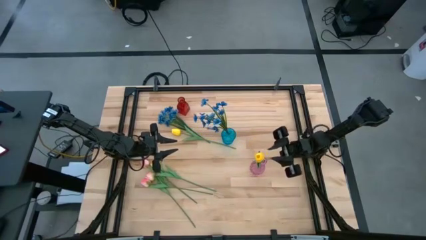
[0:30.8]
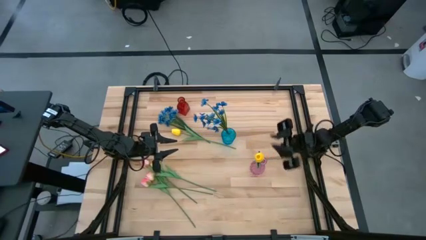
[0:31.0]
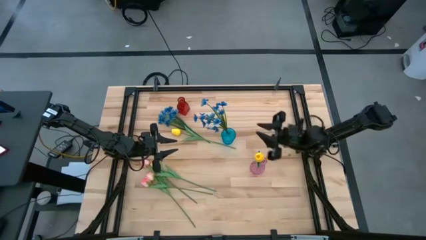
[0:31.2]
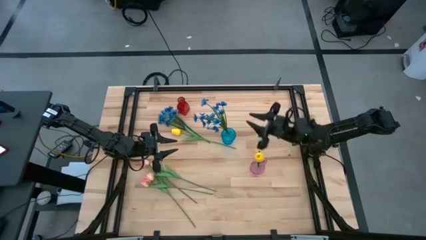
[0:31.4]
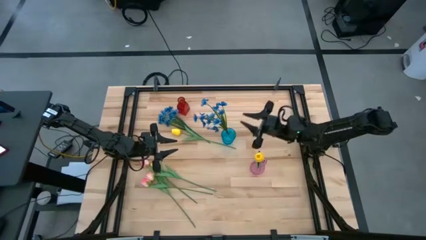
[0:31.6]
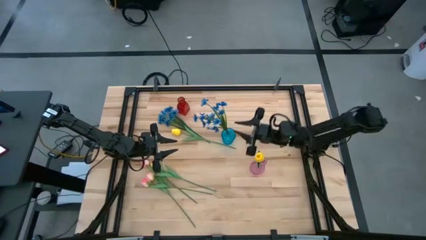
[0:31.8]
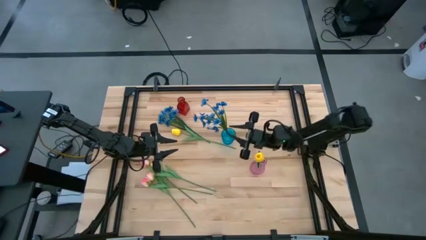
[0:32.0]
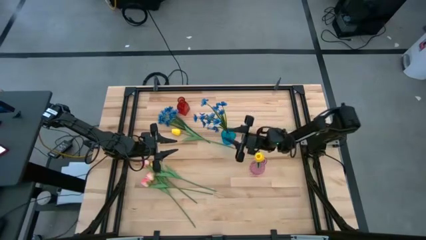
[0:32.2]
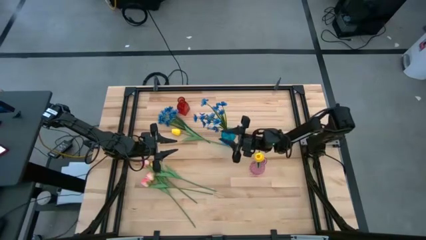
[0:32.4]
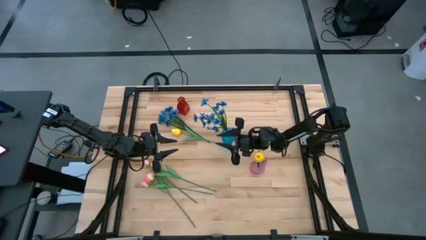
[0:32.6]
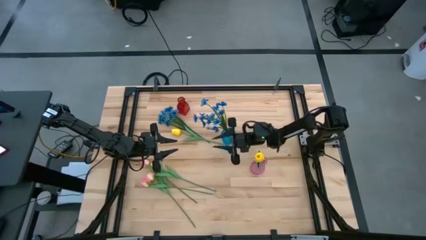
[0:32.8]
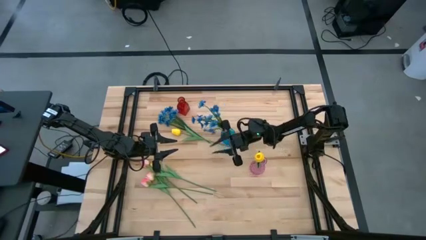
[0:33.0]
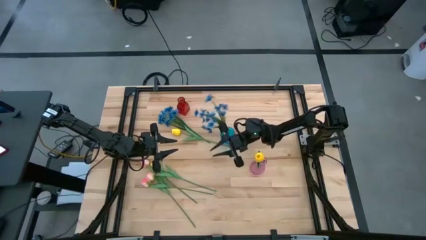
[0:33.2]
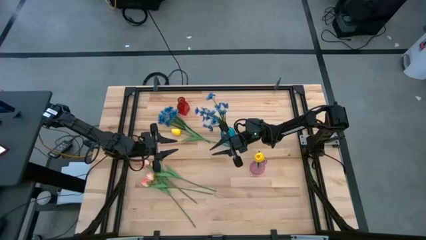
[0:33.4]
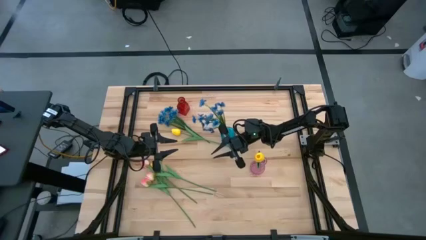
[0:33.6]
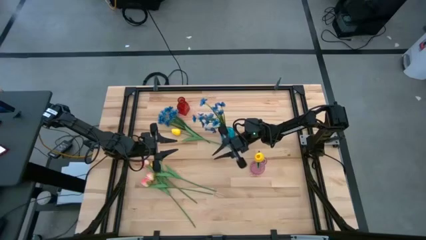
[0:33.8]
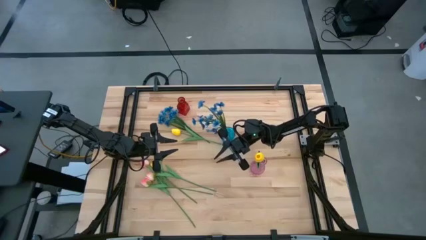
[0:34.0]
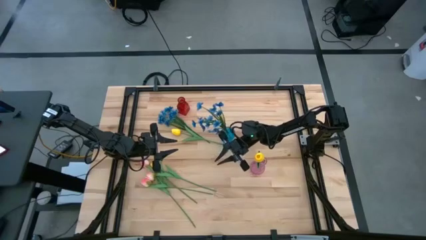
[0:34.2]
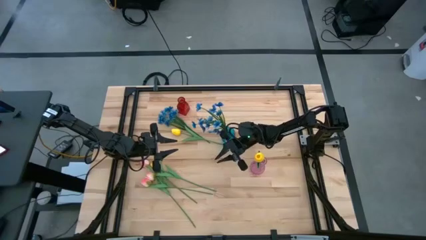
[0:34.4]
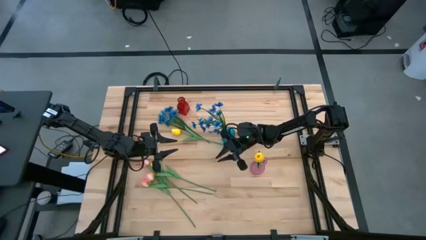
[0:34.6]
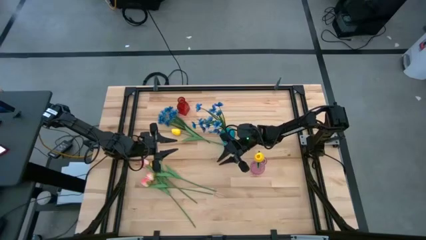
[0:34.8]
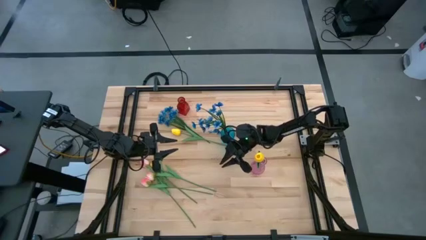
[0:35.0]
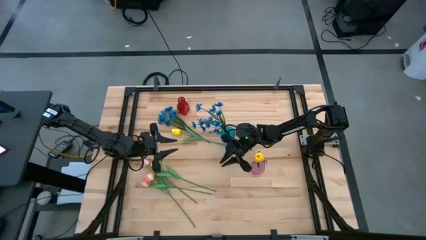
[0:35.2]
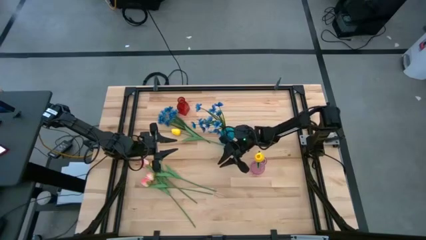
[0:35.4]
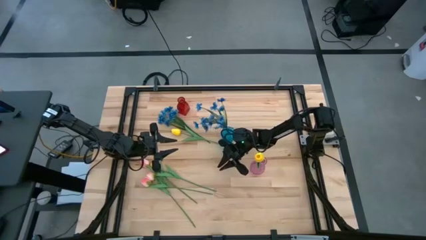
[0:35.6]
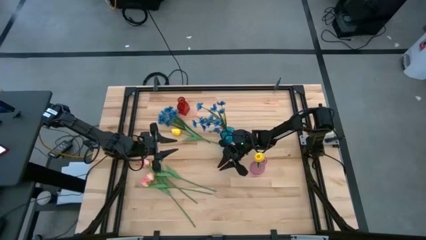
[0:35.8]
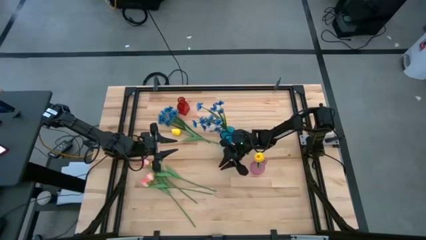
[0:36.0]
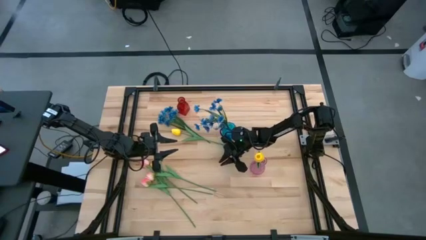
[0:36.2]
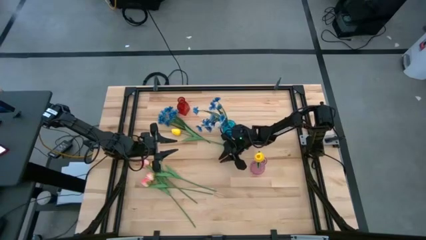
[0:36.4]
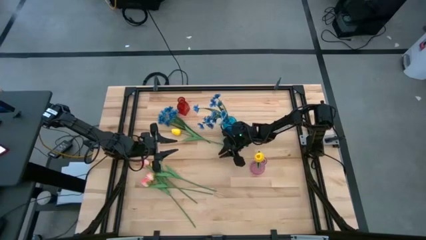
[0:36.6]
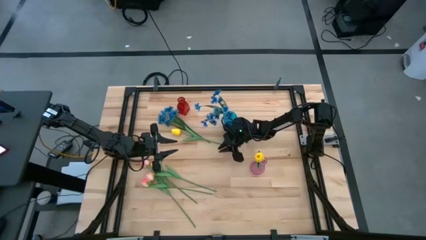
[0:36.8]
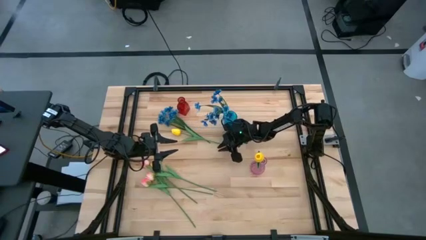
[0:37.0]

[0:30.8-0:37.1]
Task: Sort flowers into vase by color
Adjust the blue flower vase

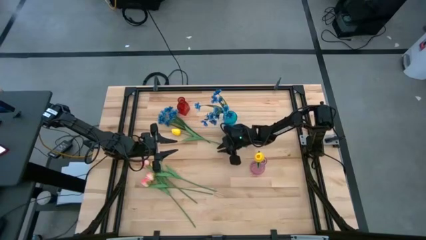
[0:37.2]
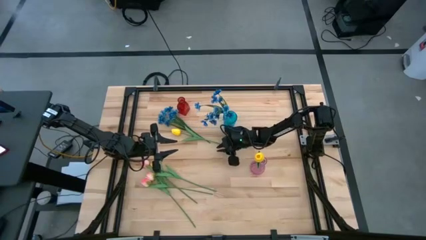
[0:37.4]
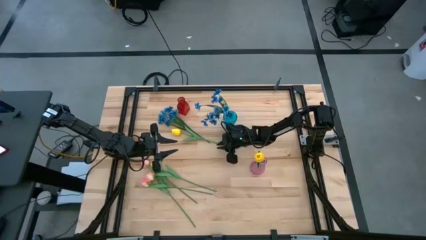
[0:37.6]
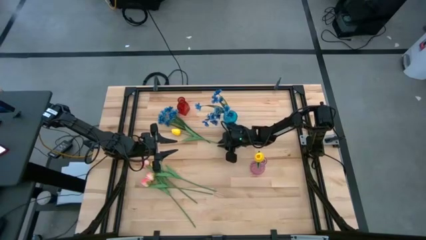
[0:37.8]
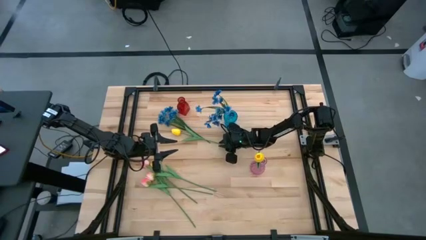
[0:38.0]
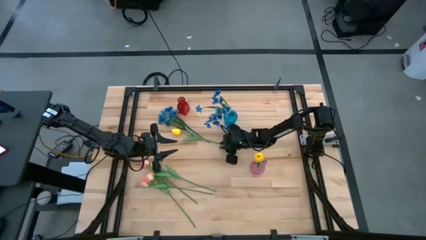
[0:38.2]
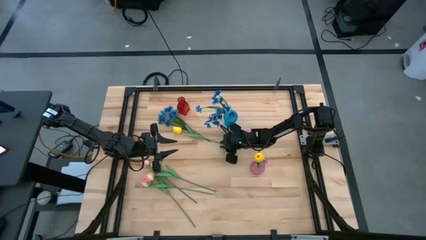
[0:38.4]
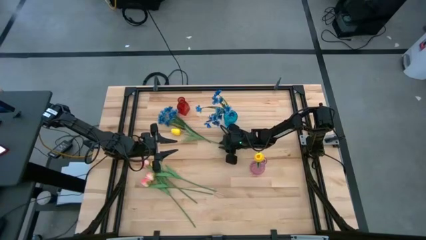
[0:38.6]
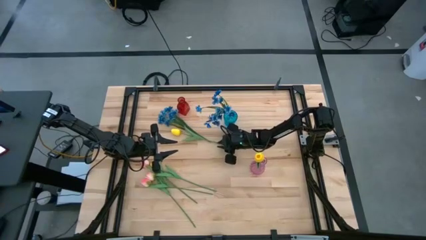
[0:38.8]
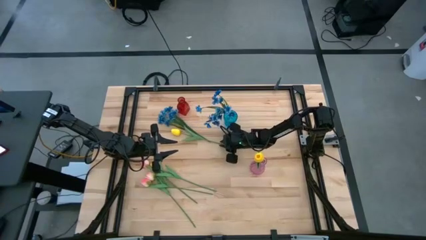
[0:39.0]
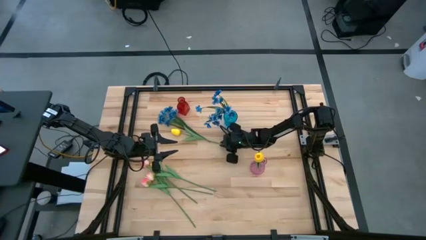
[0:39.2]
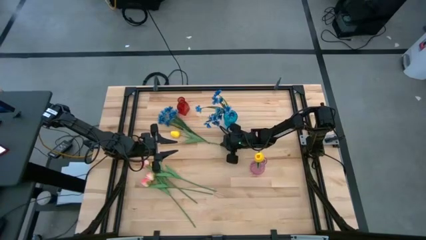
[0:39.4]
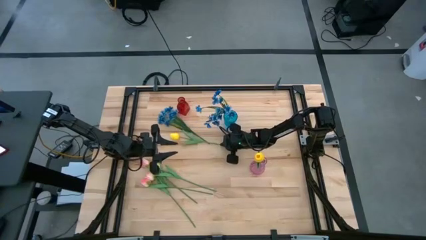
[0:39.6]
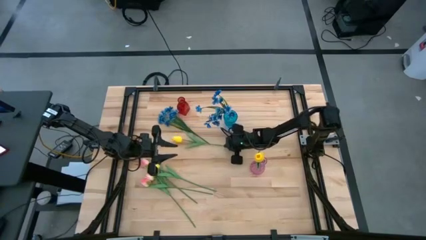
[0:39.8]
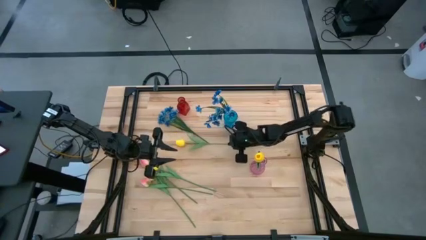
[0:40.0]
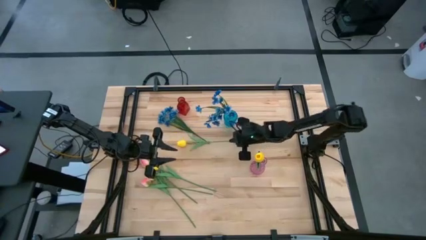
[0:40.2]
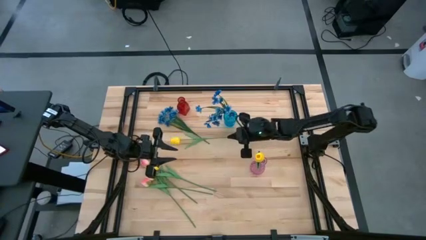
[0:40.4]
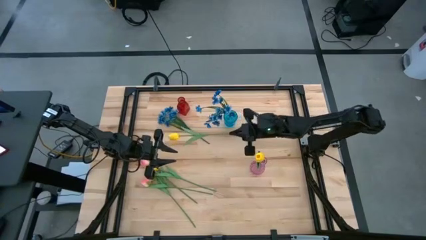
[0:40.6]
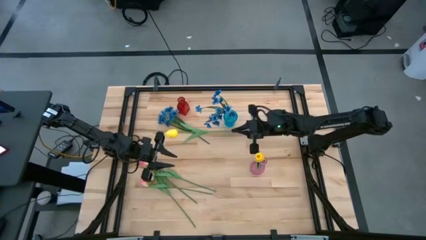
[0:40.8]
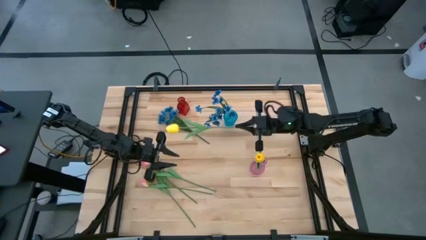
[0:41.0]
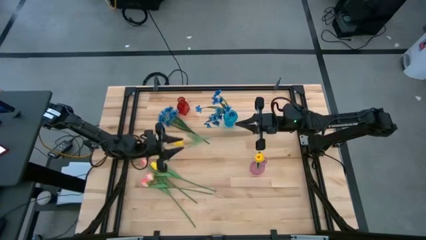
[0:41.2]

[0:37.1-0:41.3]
Put the top yellow tulip into the violet flower vase

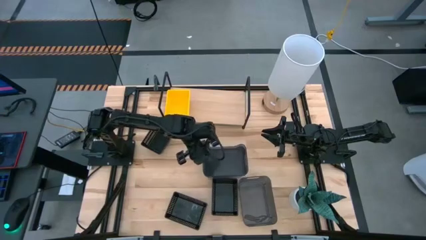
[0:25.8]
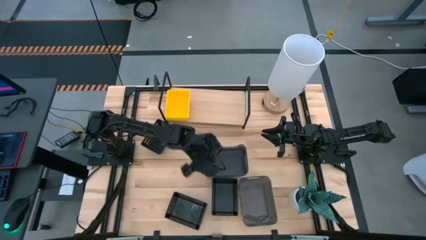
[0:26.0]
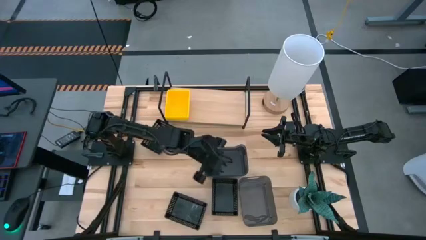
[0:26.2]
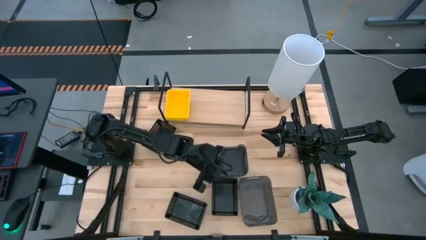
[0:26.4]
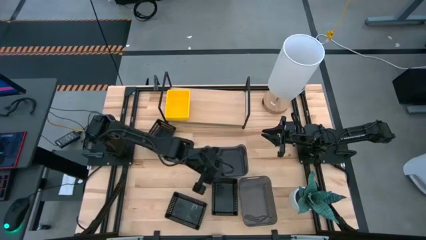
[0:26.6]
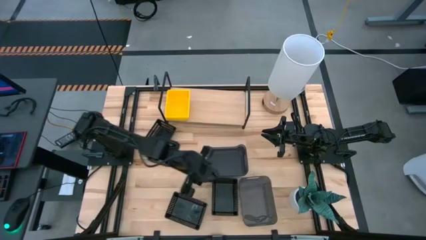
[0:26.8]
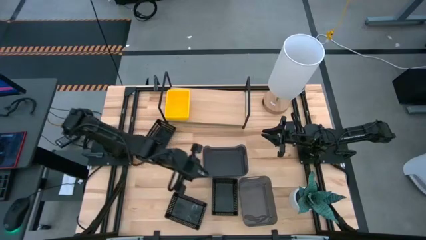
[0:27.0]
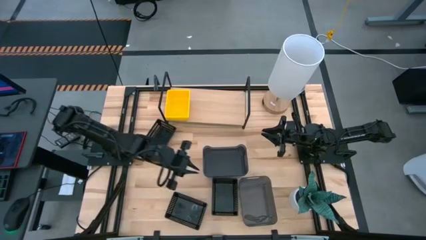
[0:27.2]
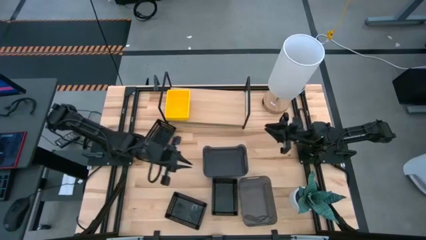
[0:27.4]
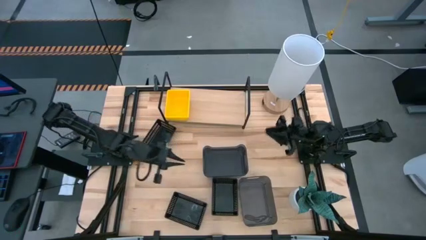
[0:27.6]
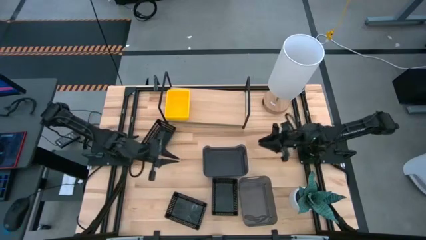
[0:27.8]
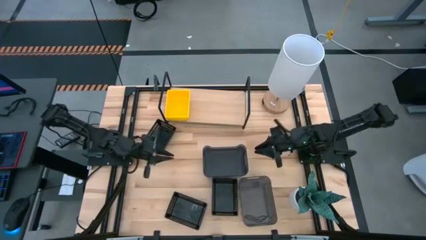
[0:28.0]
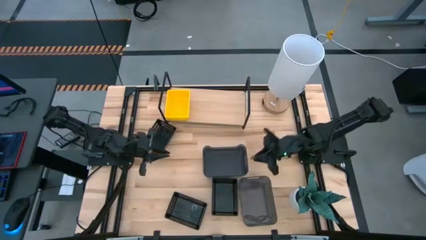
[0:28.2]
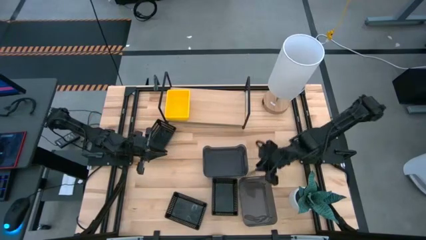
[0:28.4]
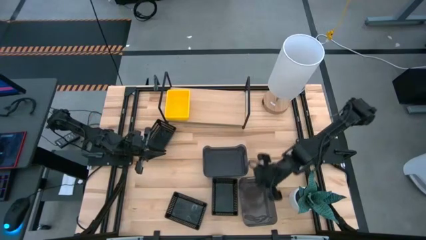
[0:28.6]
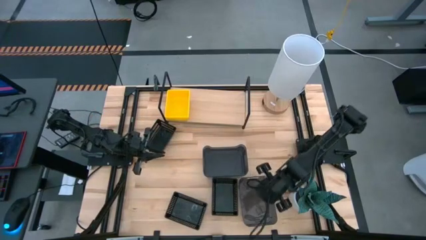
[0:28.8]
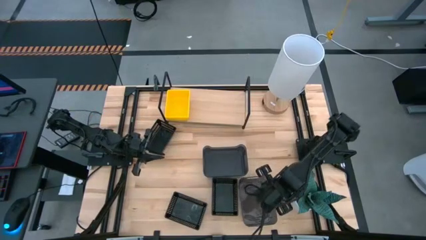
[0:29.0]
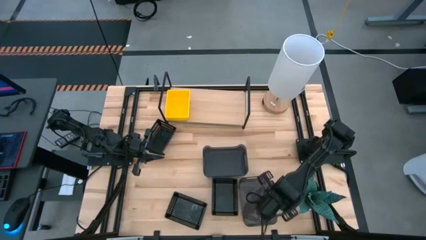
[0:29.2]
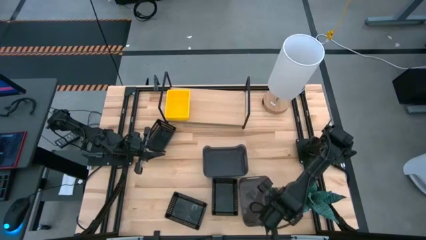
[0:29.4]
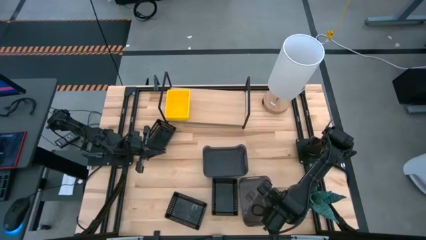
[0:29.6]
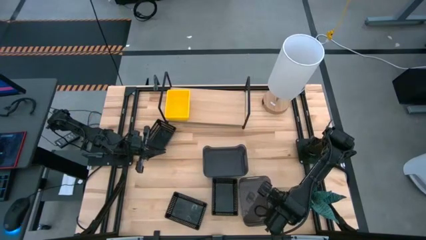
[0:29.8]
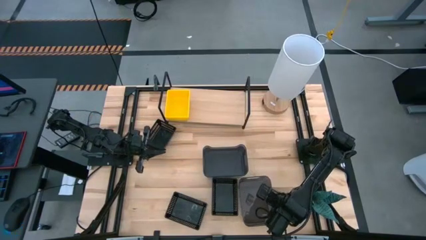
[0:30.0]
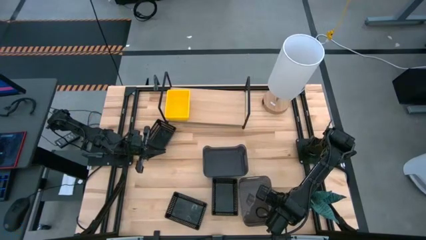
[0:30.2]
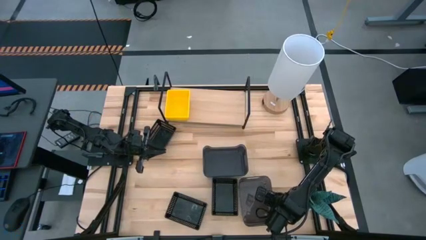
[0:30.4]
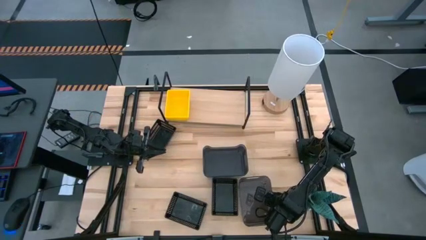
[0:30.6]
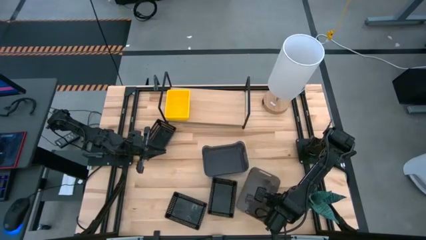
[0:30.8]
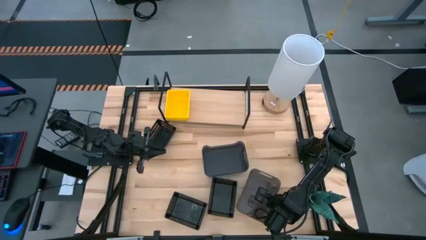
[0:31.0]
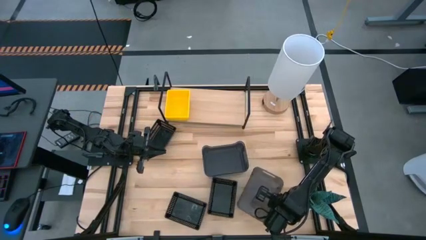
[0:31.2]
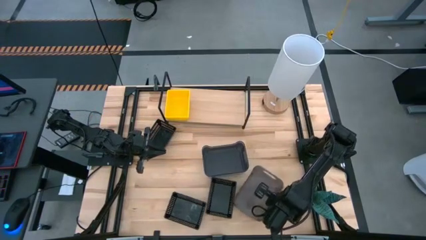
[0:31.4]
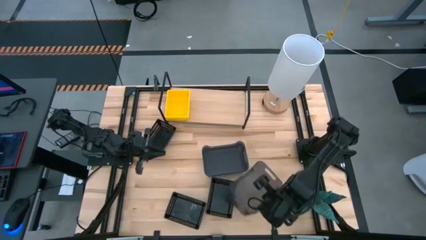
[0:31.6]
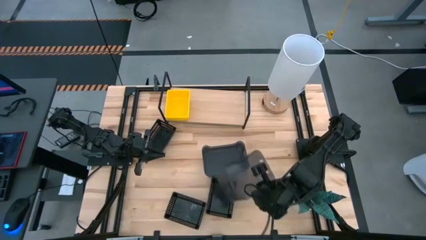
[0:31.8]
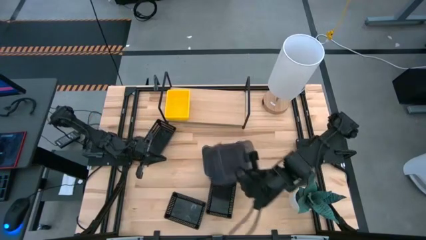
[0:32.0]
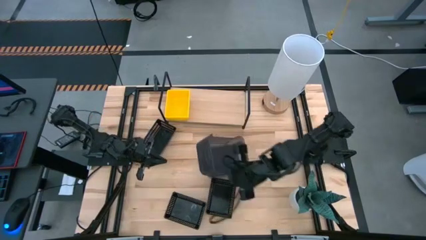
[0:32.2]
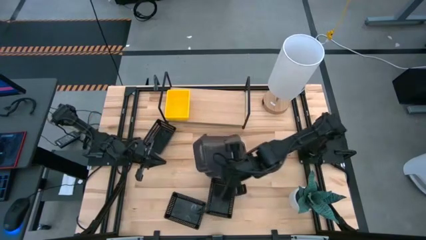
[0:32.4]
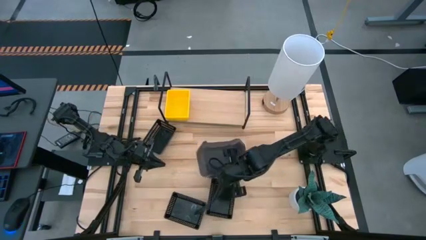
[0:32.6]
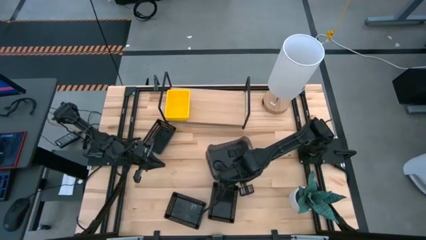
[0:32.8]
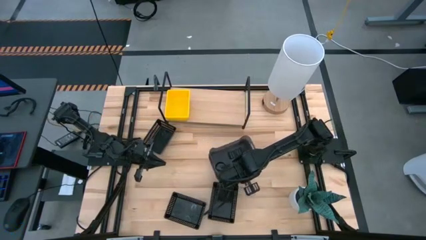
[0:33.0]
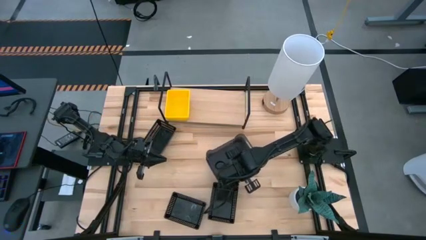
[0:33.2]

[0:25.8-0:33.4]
Task: Stack baskets on shelf by color
Stack the bottom light black bin on the light black bins
